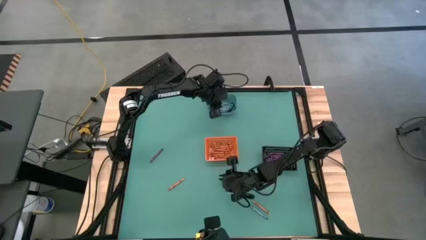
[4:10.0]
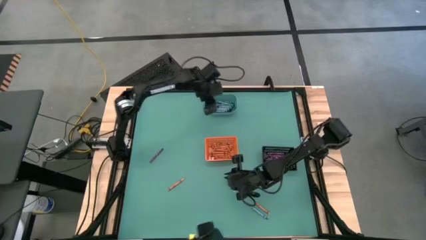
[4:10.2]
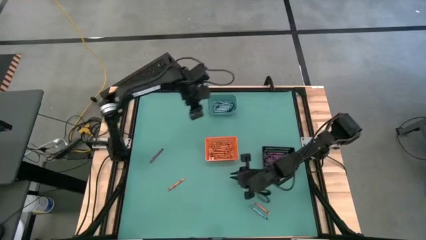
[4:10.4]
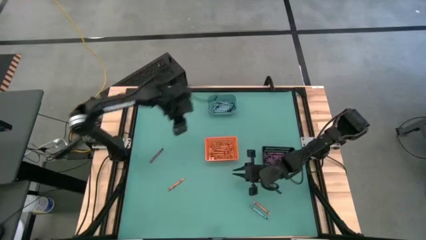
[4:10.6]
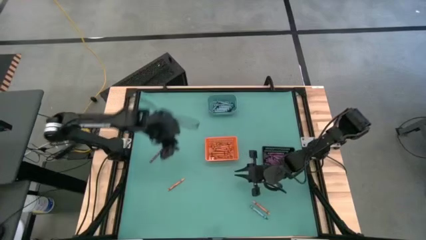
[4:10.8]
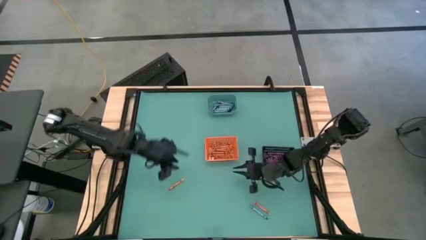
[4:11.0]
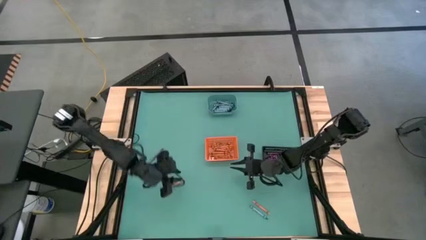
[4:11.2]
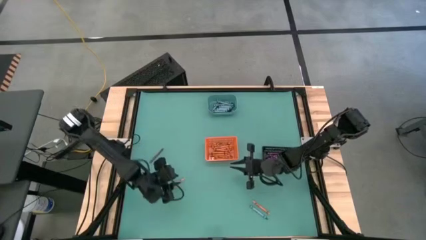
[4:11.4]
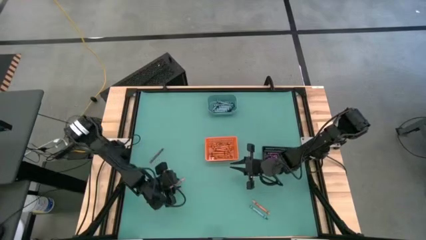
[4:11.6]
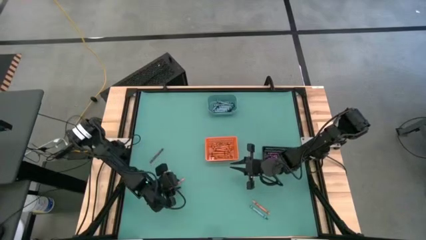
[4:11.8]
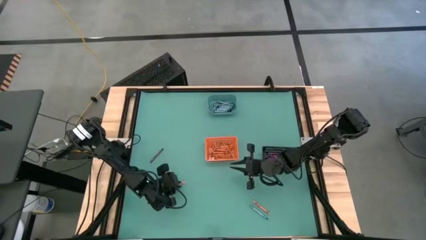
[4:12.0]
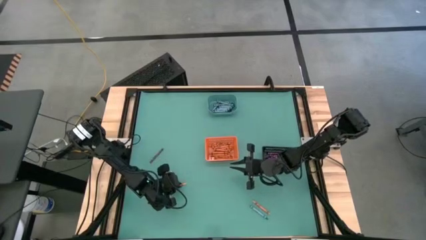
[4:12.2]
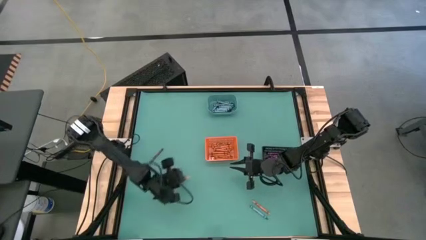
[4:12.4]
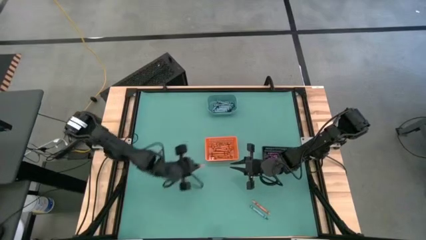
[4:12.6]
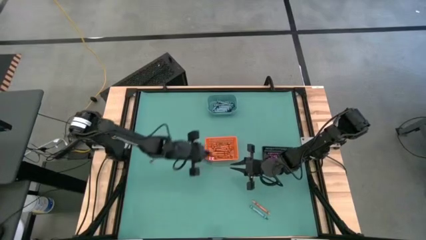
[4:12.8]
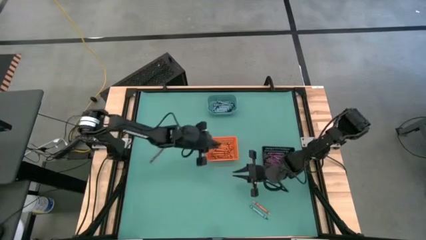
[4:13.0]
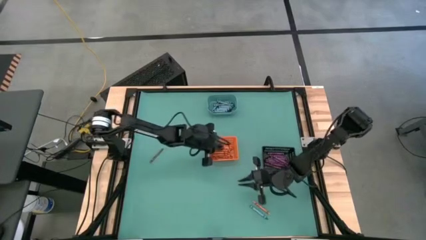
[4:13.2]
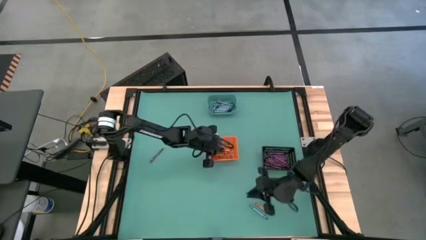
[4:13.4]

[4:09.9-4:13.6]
Task: Sort crayons
Put the orange crayon into the orange bin

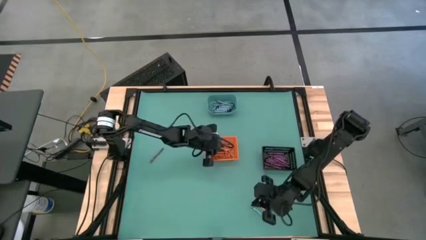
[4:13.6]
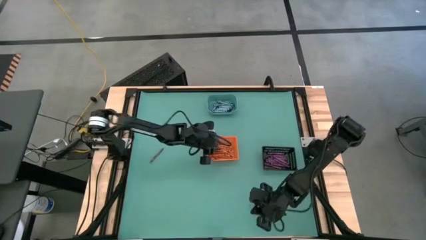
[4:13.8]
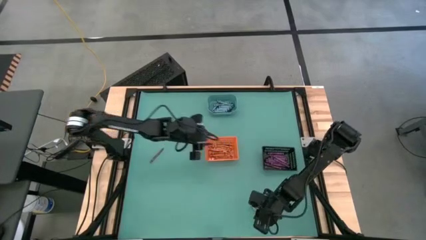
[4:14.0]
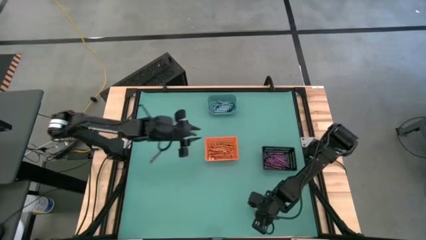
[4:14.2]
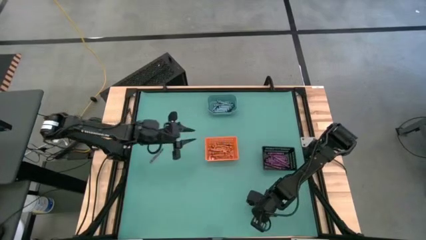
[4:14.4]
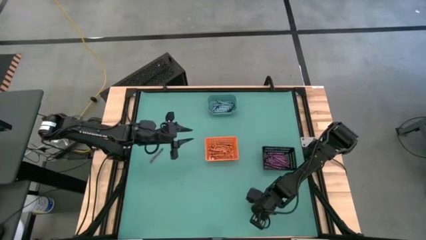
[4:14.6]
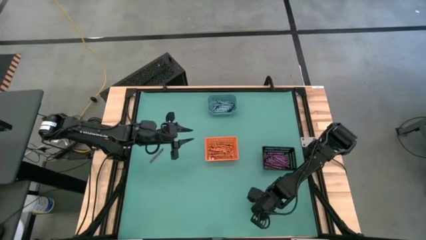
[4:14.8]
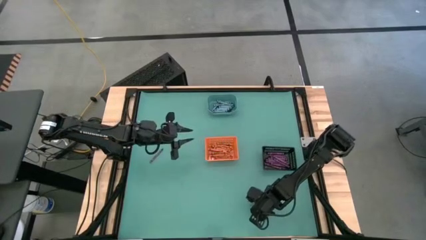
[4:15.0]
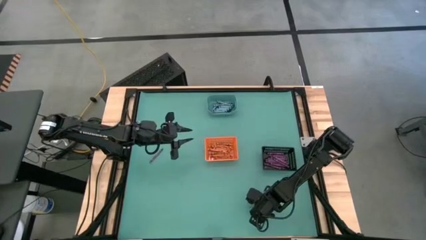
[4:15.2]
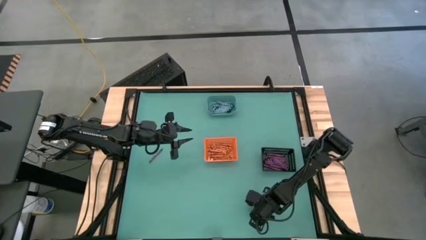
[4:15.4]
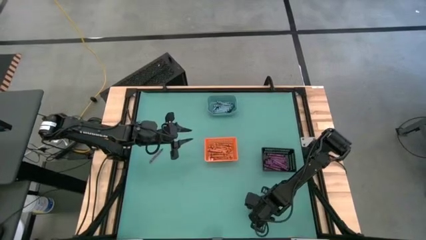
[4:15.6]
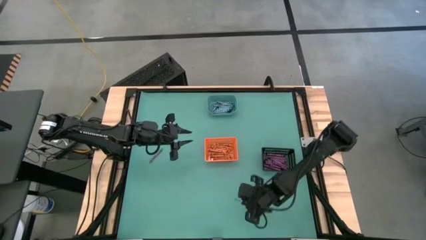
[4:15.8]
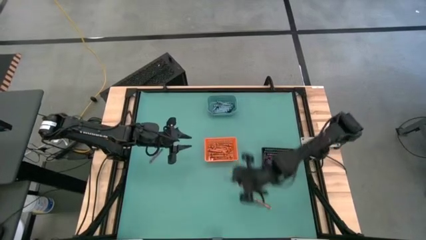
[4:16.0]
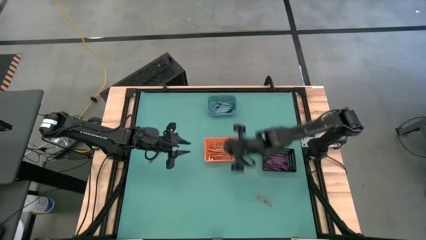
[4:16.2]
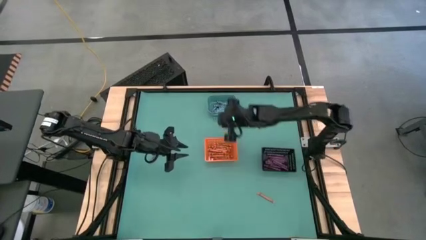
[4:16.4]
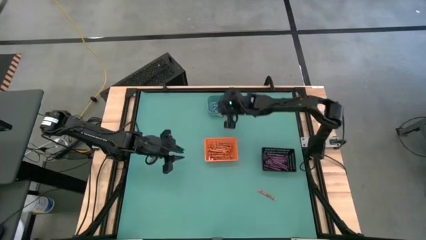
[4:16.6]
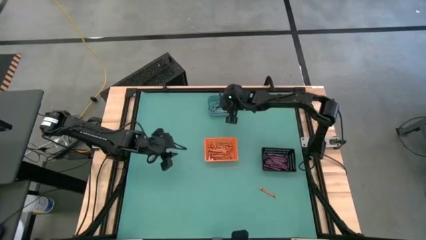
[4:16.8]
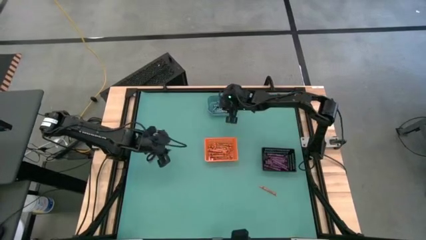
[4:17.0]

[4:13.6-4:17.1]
Put the green crayon into the blue bin

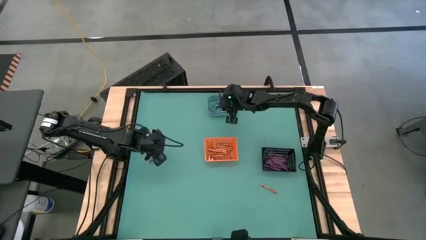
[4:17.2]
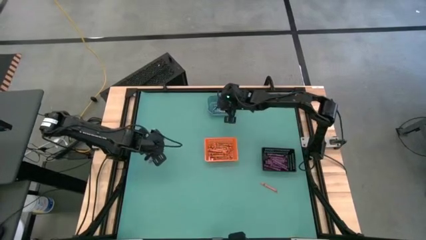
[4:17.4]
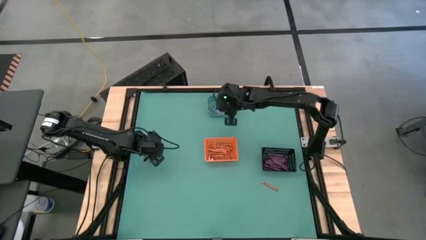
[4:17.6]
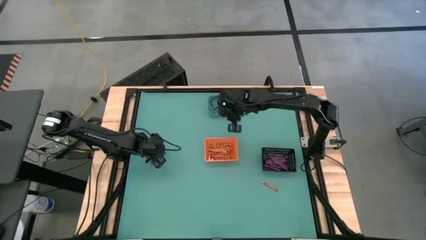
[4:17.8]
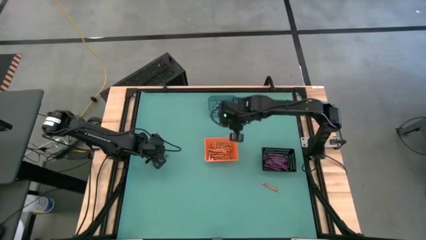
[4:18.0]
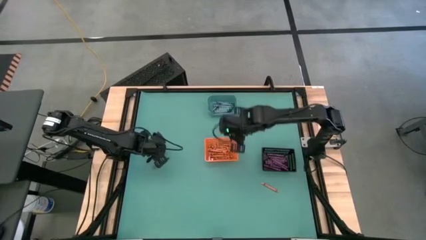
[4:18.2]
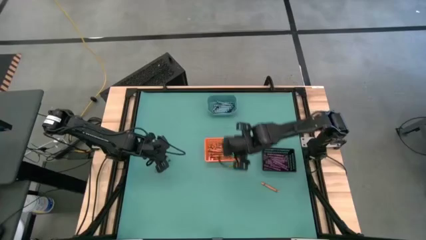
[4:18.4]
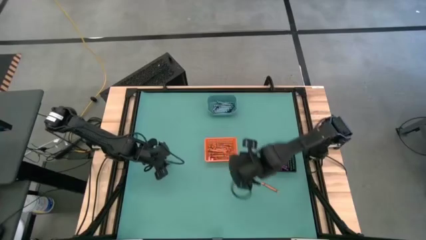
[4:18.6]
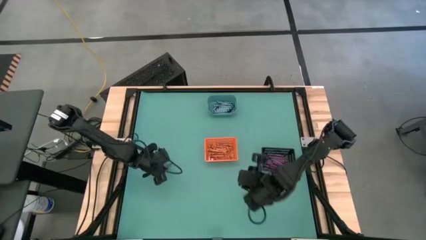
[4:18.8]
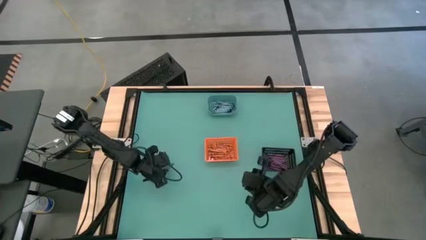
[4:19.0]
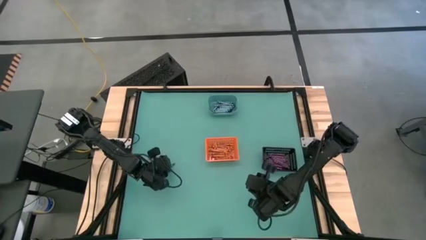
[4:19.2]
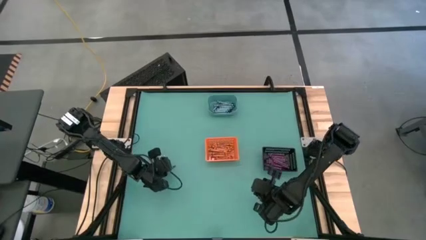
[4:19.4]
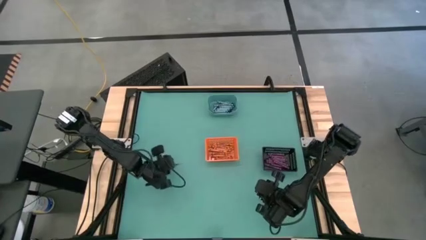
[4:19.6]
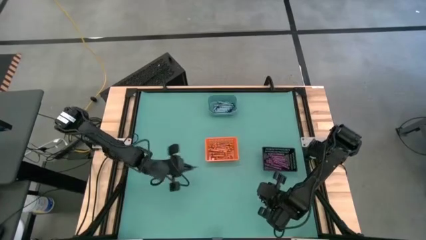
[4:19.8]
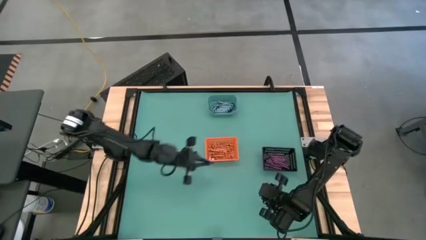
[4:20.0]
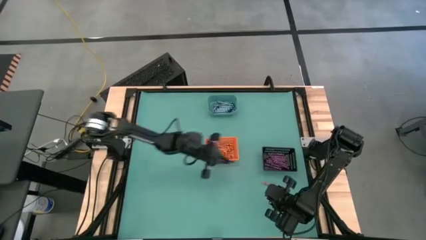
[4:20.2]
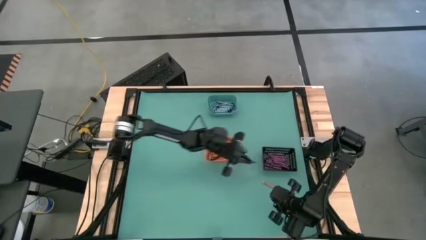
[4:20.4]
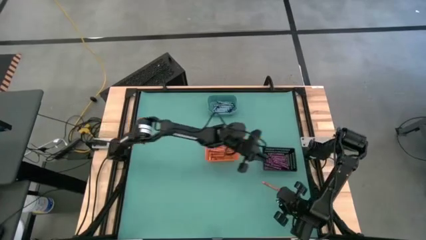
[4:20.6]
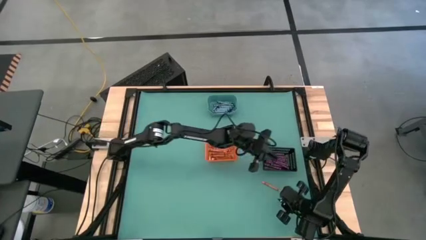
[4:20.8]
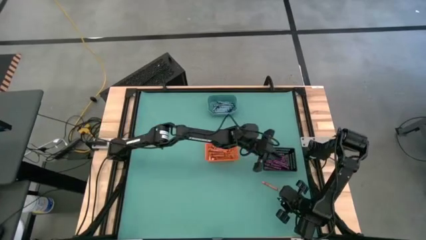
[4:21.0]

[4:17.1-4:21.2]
Put the violet crayon into the black bin

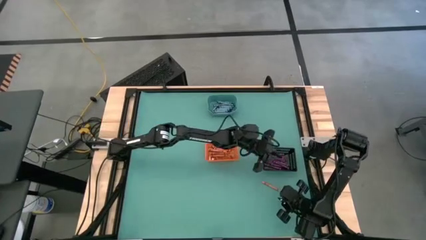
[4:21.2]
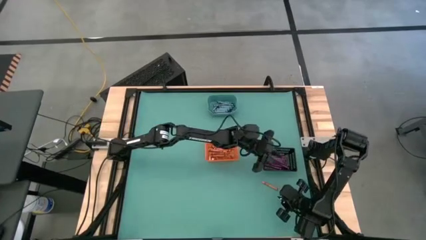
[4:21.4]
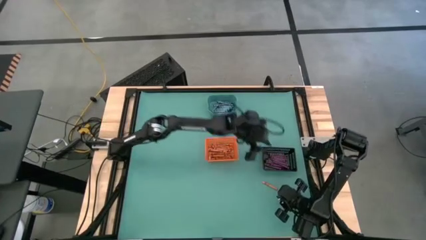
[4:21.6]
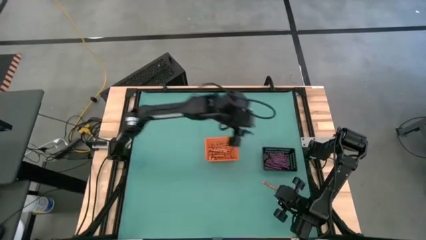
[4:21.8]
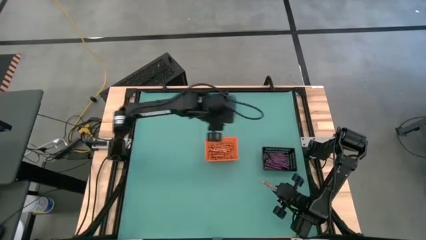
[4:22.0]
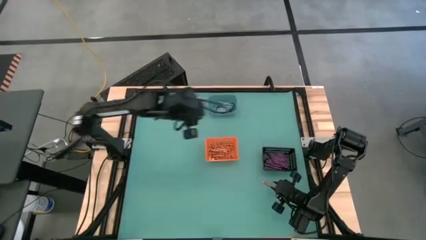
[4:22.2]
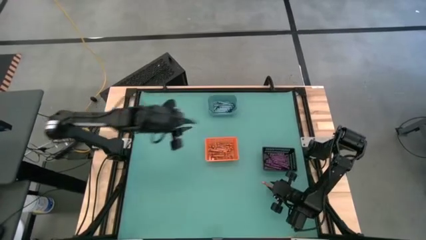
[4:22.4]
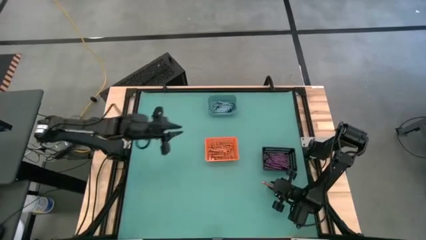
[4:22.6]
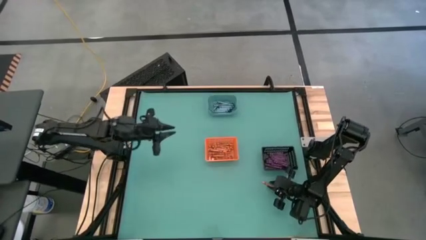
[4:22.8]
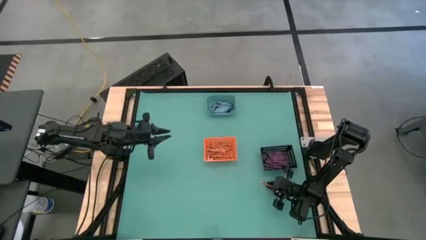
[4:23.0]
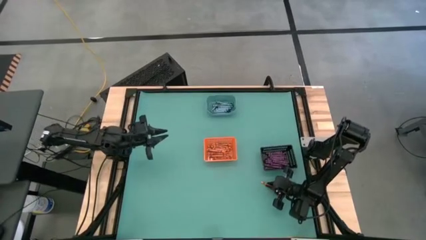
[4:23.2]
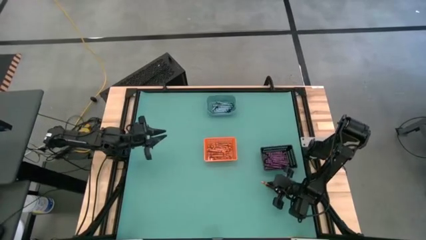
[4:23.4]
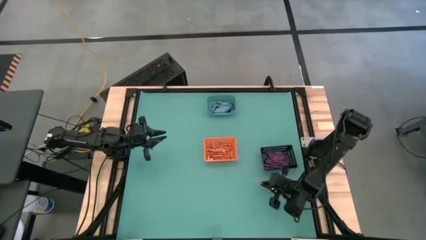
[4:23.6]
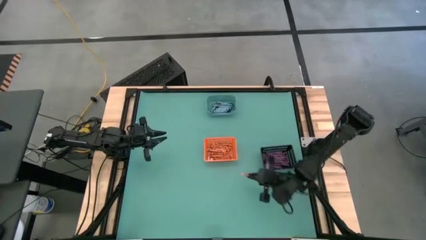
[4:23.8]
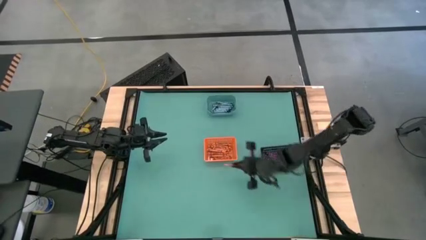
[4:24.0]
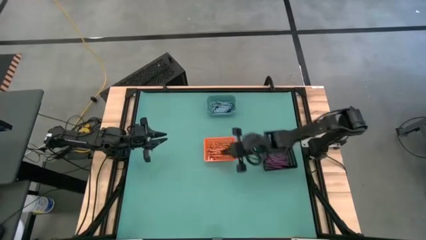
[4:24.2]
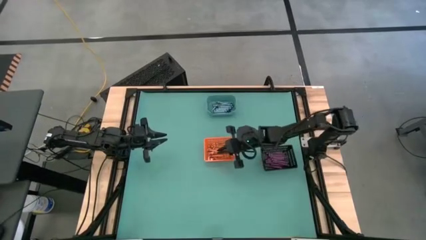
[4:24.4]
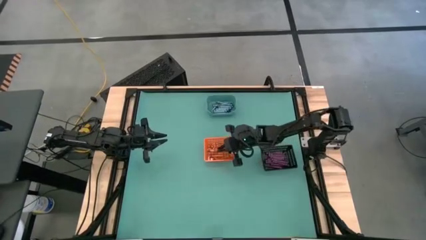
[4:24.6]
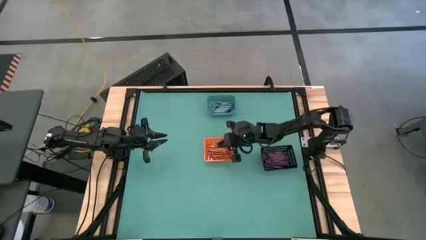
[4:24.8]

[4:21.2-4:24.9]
Put the orange crayon into the orange bin
